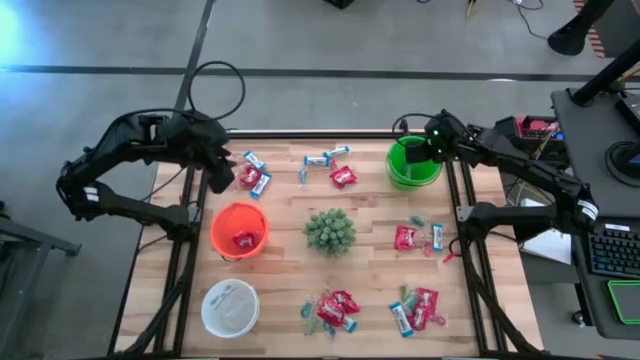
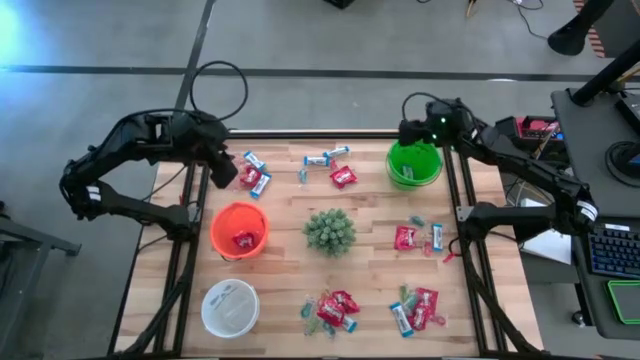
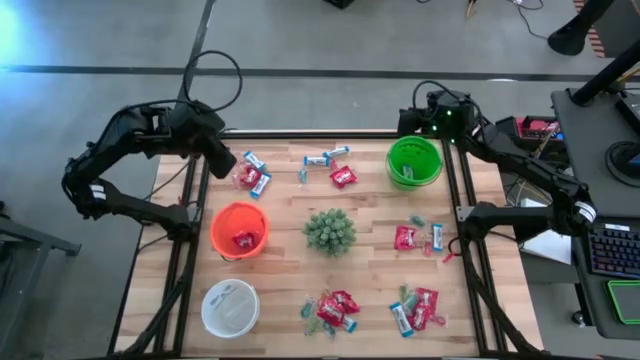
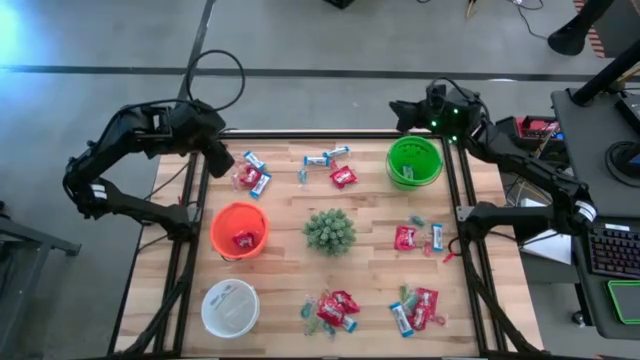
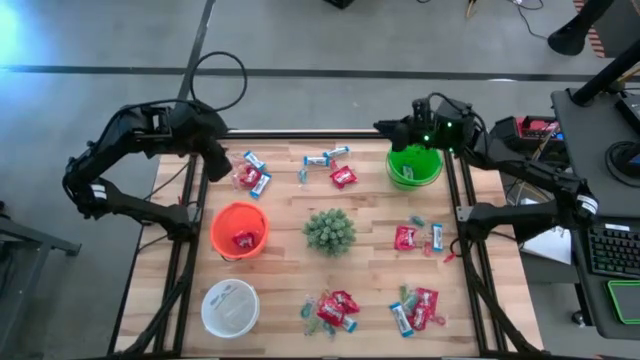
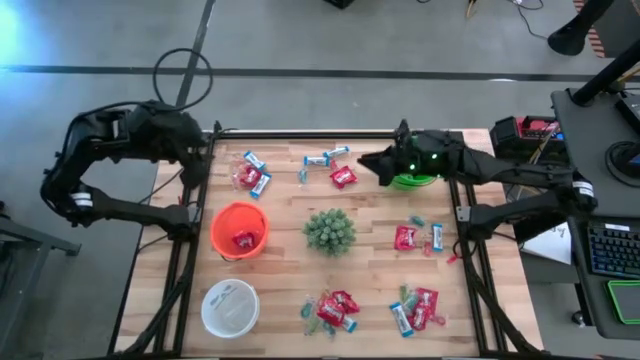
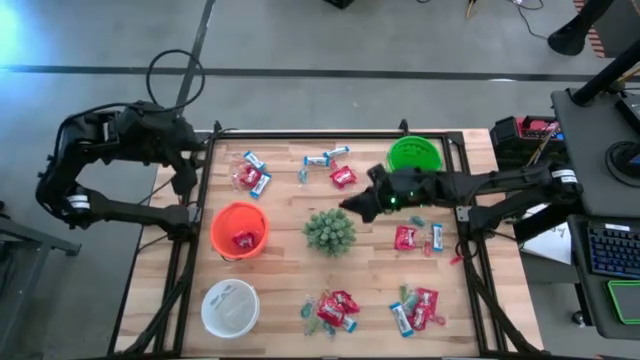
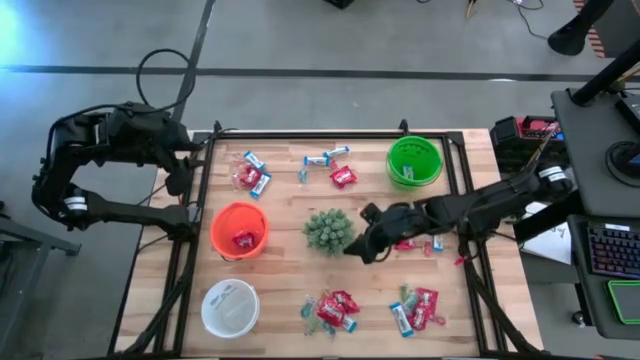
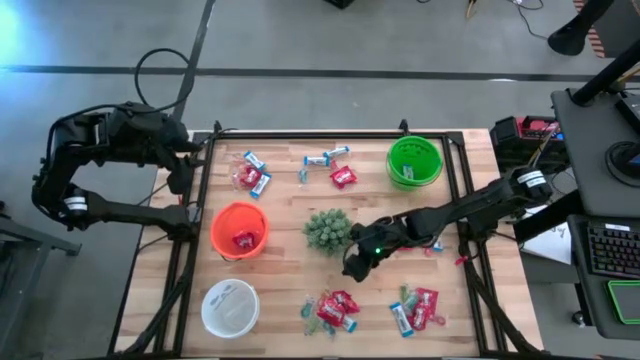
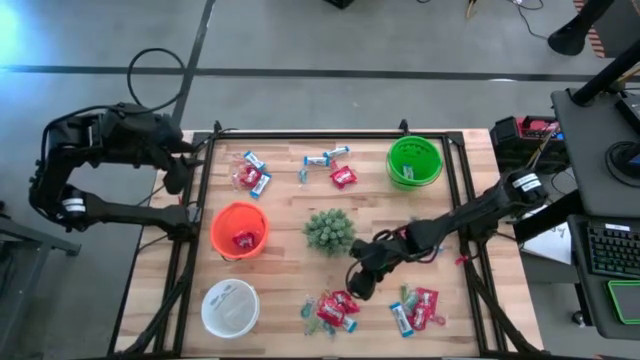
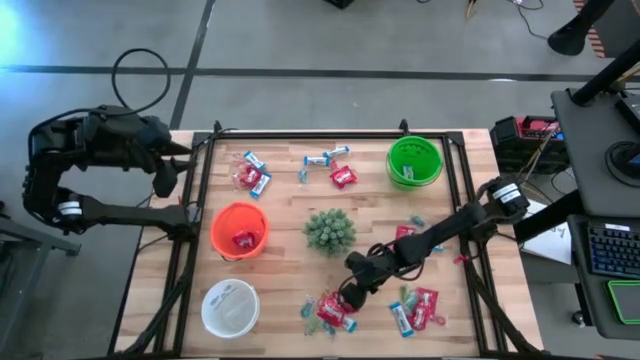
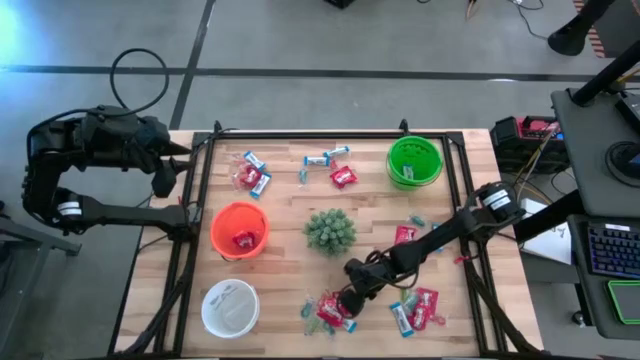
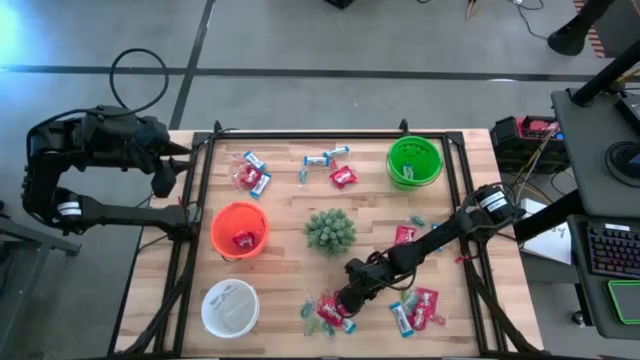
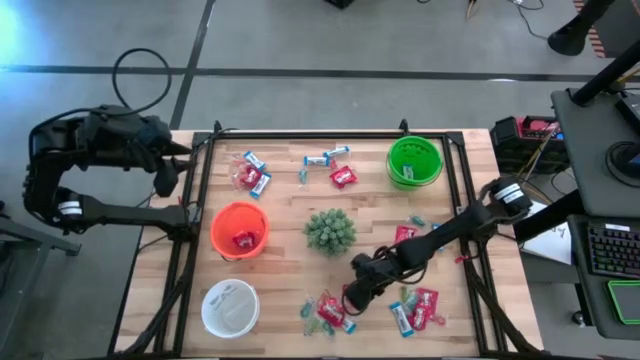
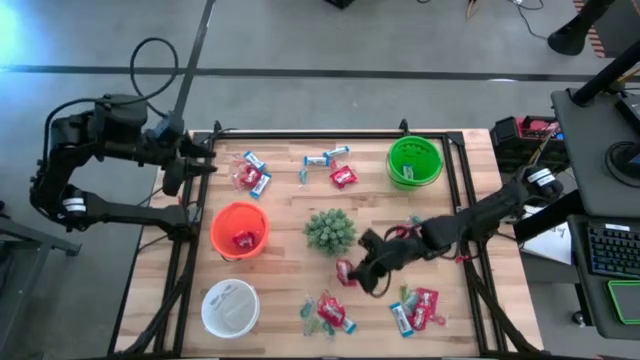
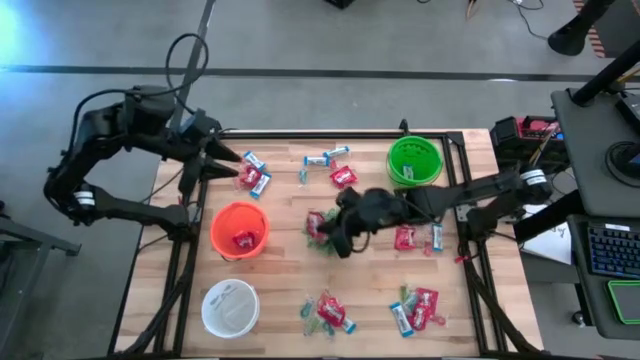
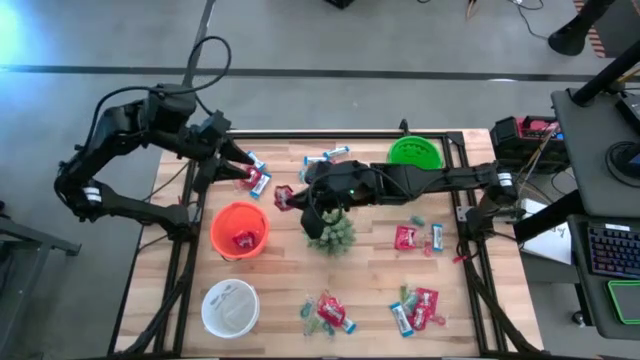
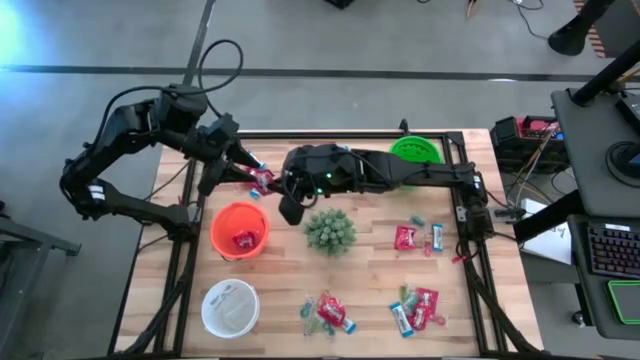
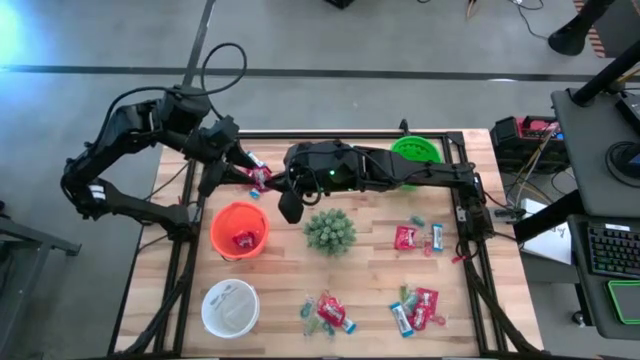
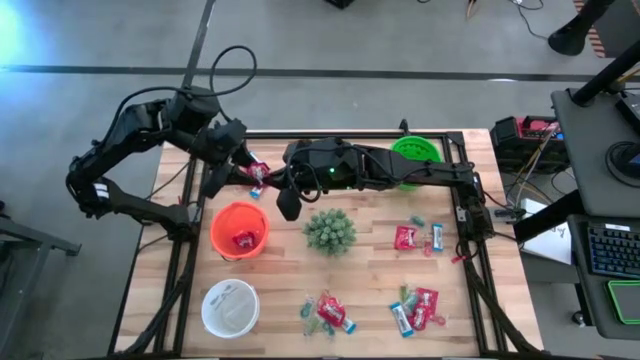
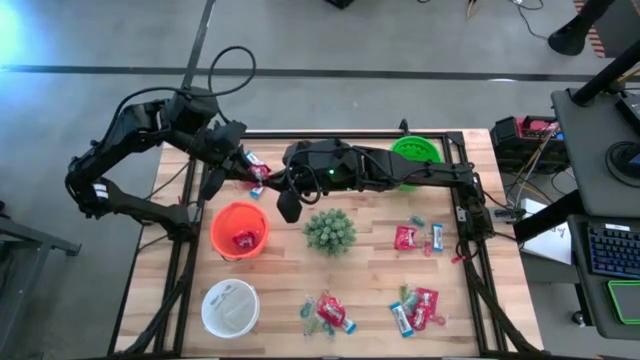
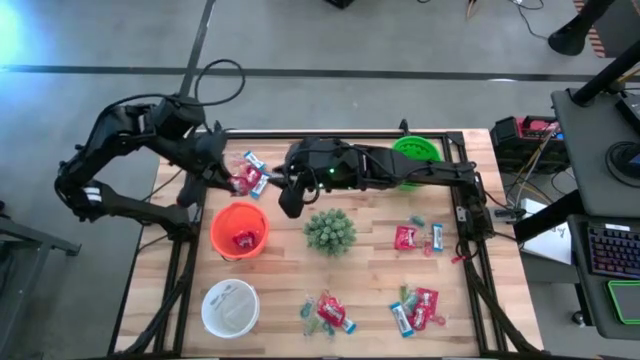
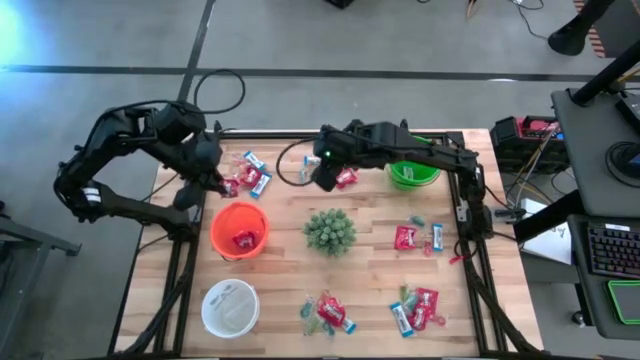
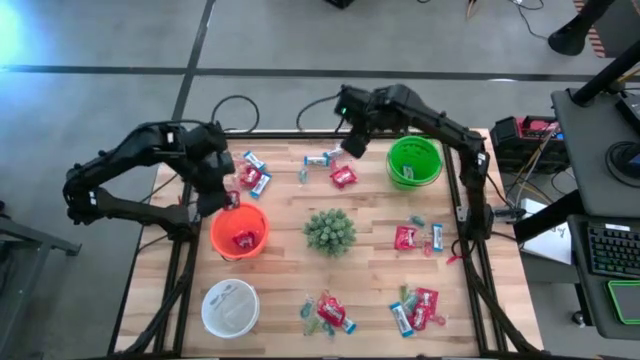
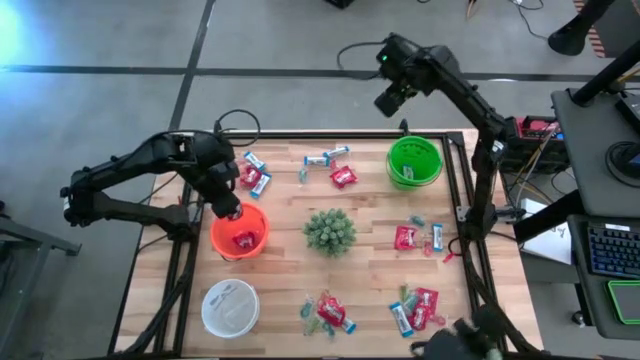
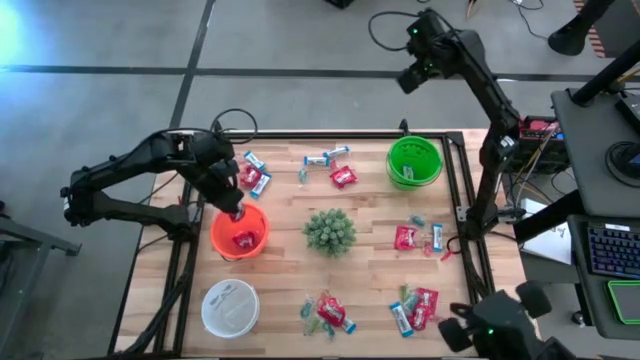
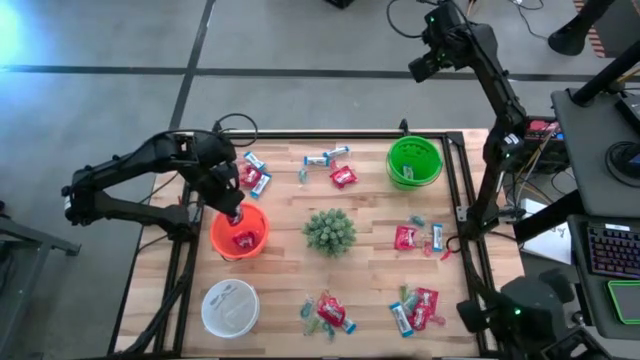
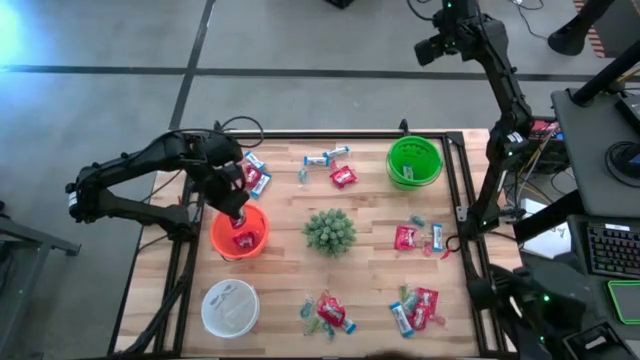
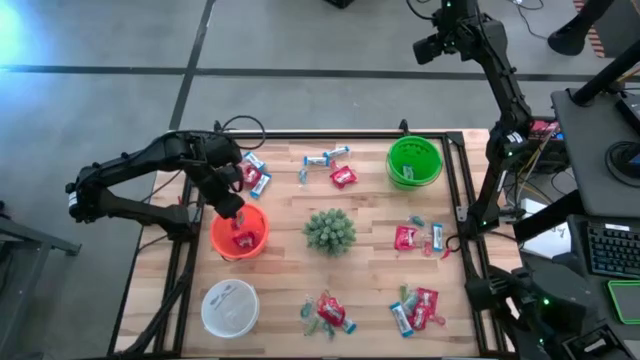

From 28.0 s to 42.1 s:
Task: Sort candy
Put the red candy into the orange bucket

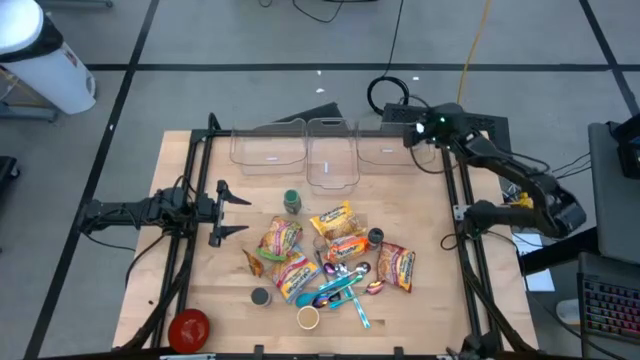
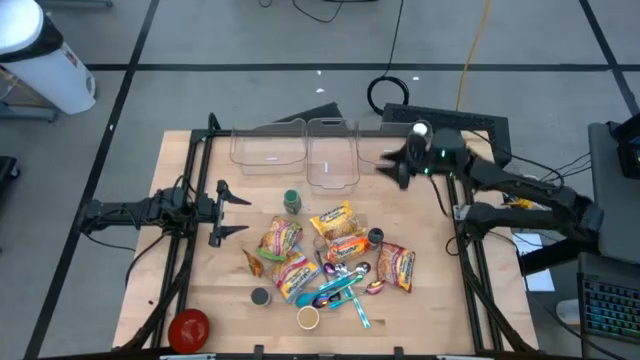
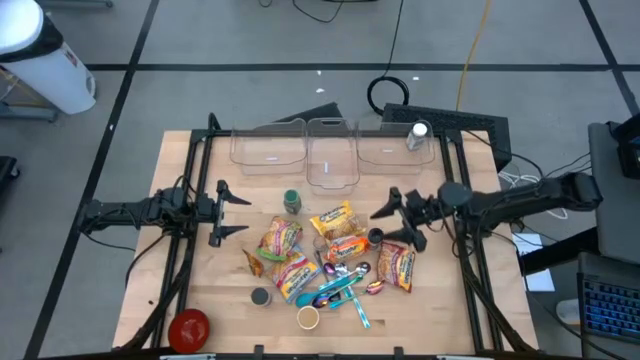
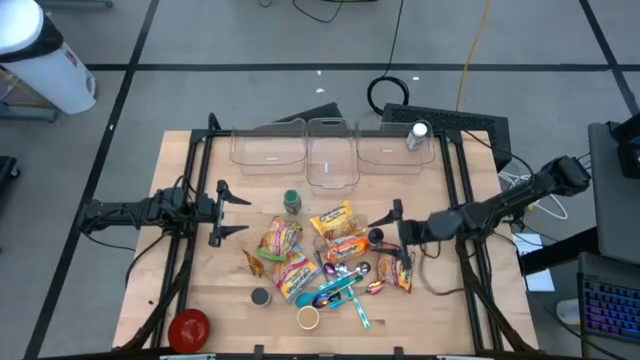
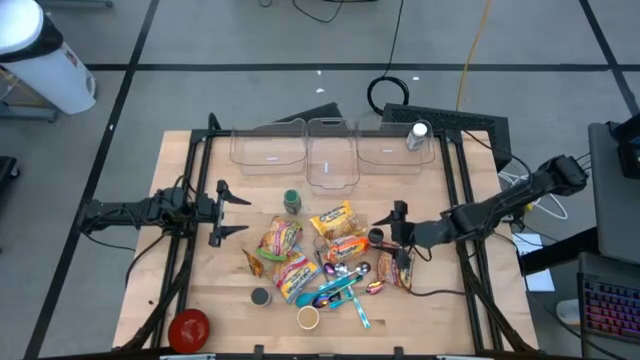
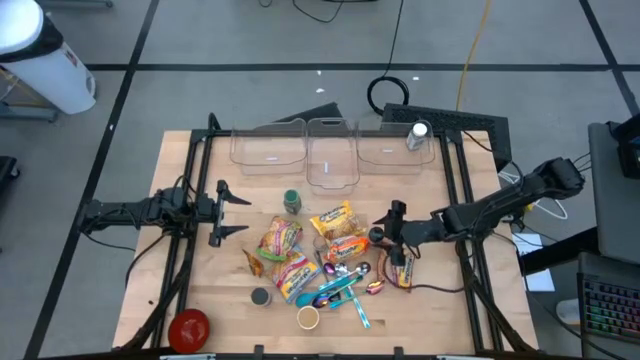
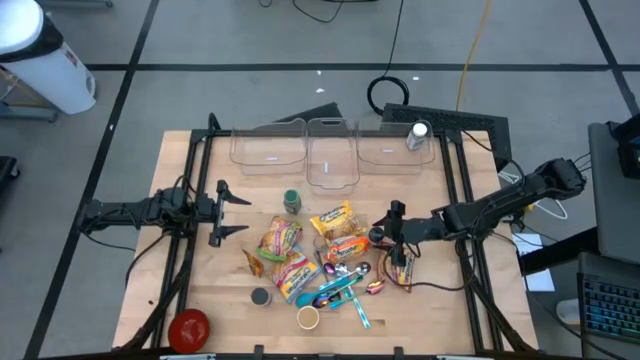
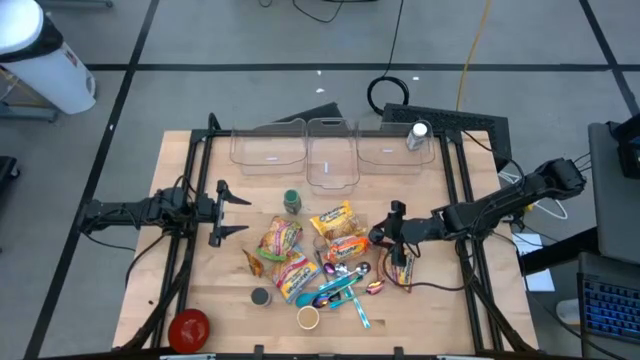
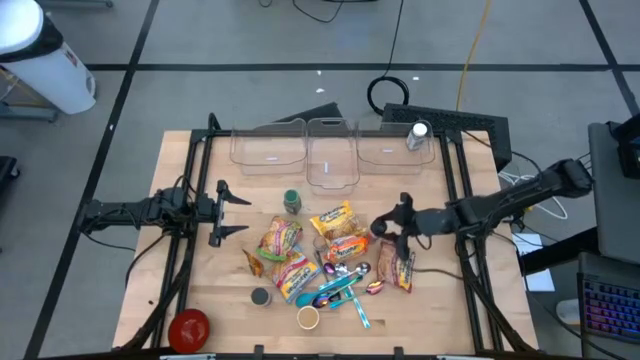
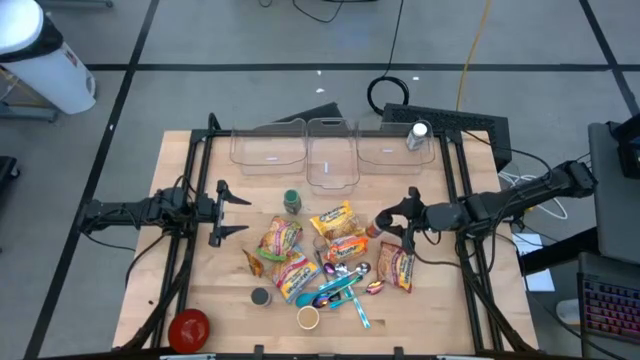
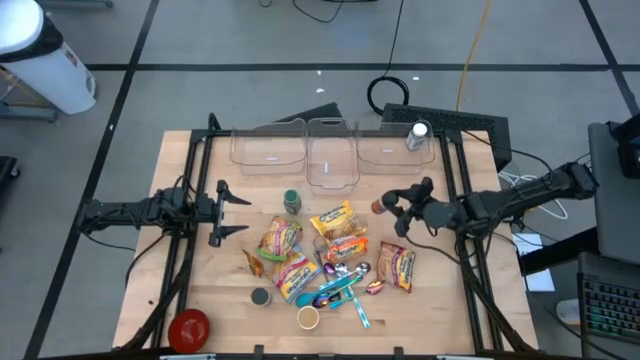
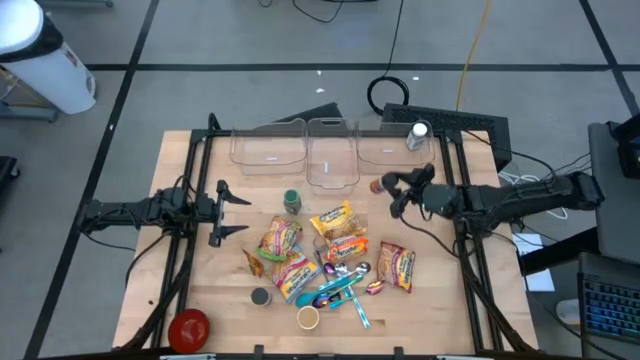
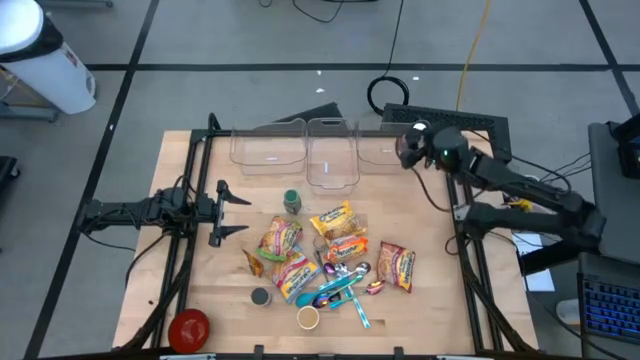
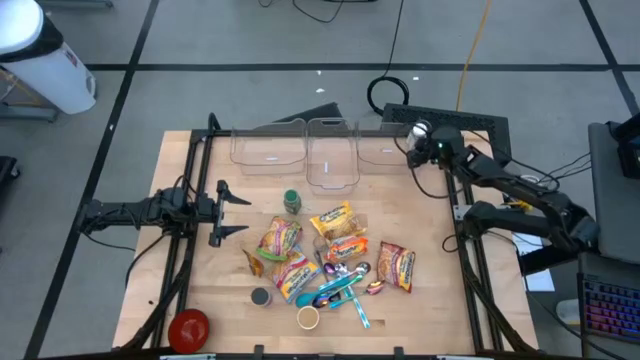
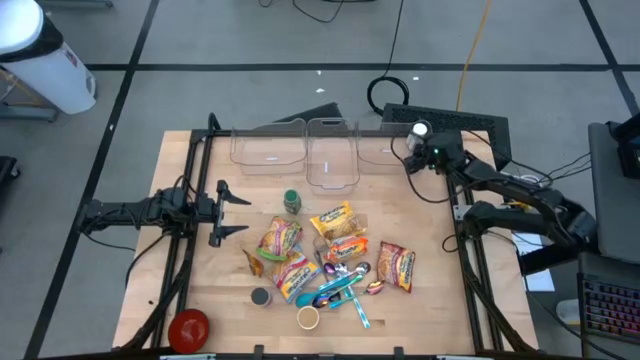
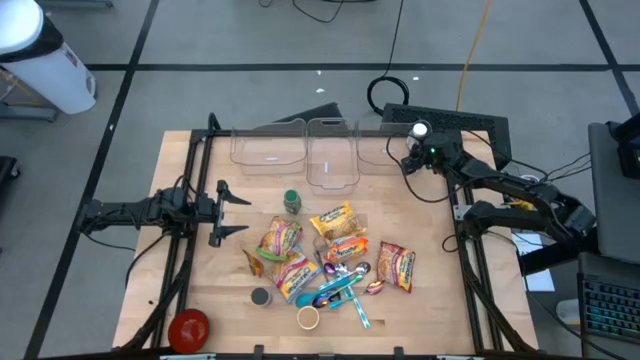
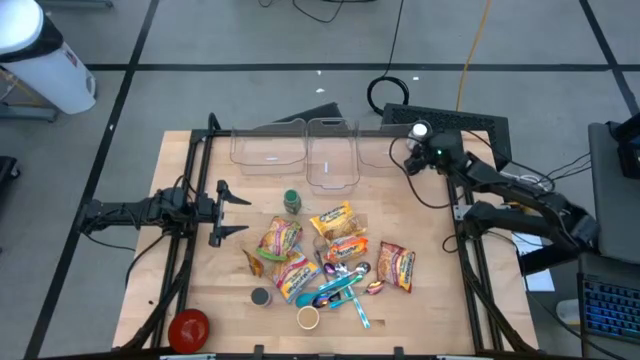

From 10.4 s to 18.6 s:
Task: Pick & Place Food Item
Put the orange seasoning bottle into the right transparent bin
